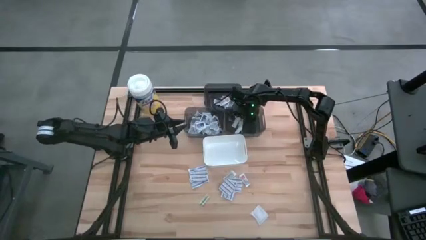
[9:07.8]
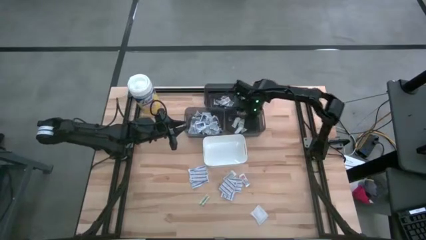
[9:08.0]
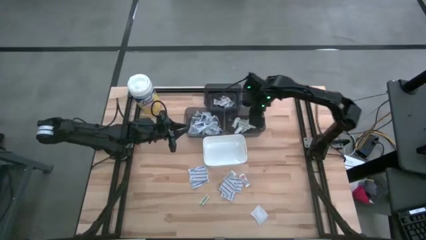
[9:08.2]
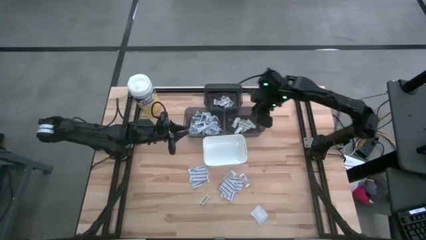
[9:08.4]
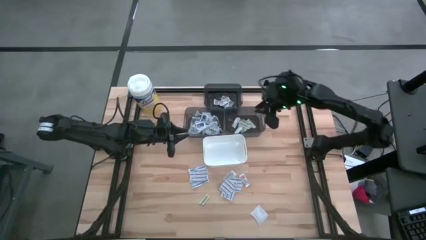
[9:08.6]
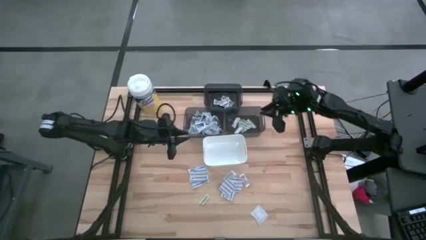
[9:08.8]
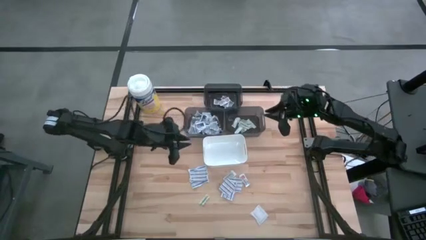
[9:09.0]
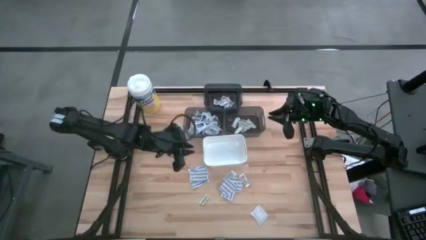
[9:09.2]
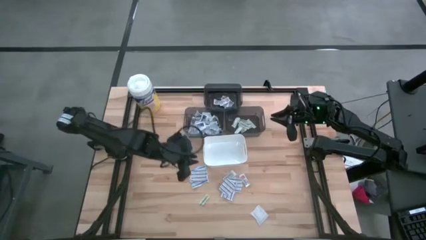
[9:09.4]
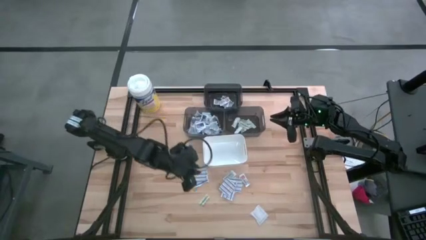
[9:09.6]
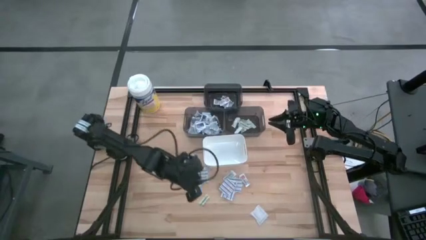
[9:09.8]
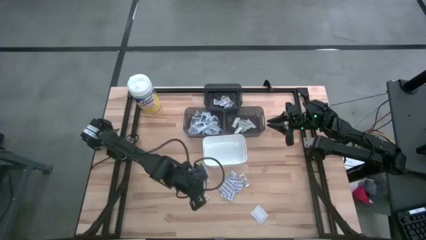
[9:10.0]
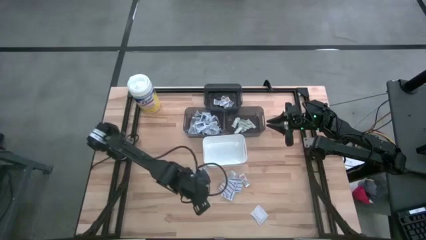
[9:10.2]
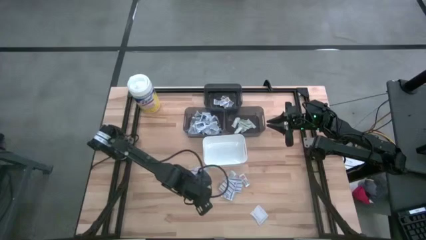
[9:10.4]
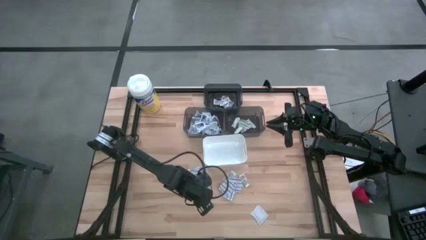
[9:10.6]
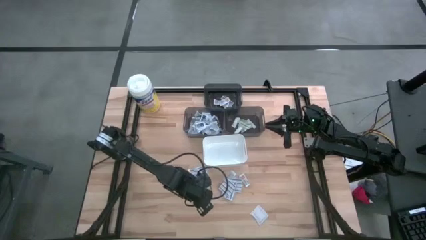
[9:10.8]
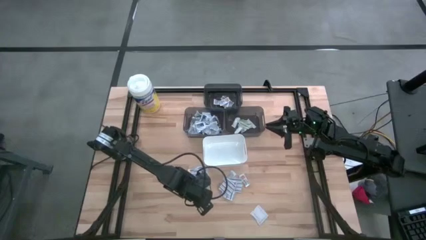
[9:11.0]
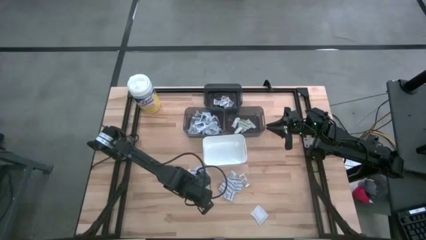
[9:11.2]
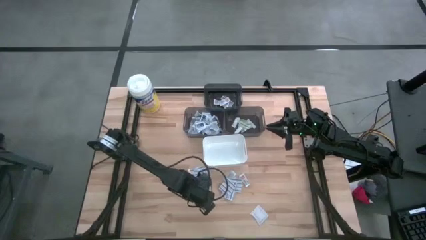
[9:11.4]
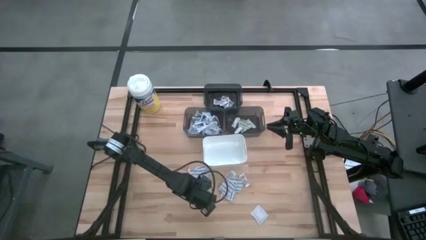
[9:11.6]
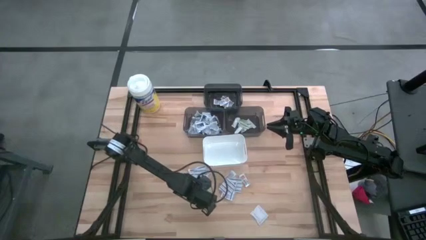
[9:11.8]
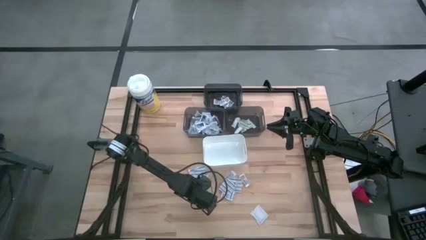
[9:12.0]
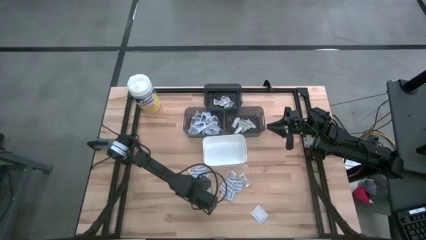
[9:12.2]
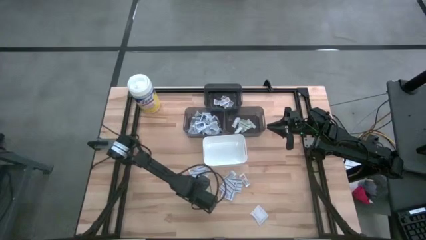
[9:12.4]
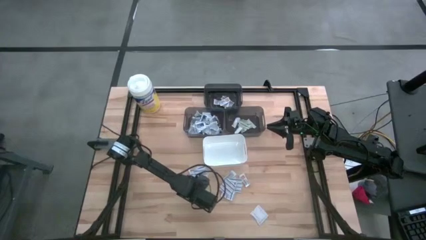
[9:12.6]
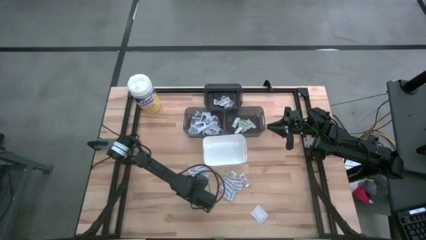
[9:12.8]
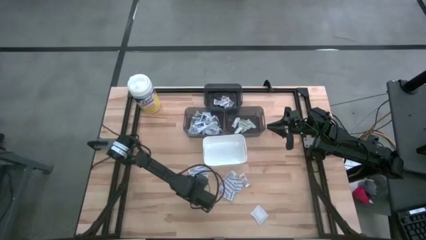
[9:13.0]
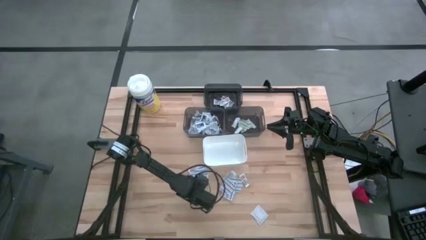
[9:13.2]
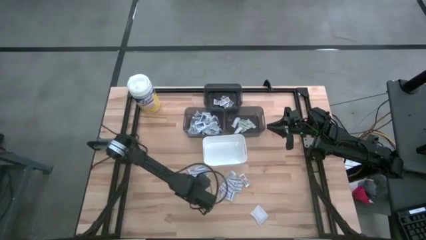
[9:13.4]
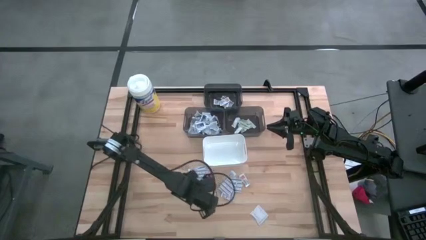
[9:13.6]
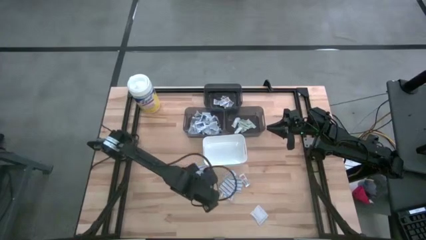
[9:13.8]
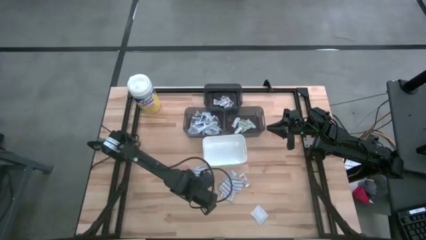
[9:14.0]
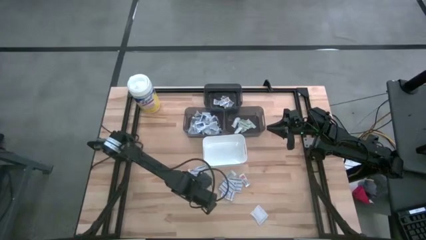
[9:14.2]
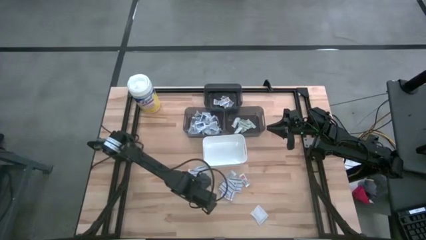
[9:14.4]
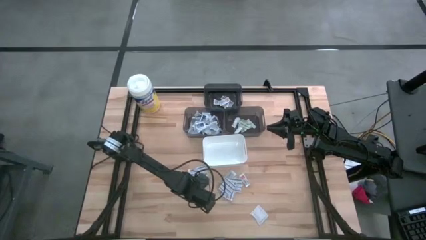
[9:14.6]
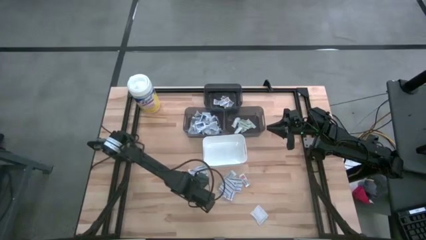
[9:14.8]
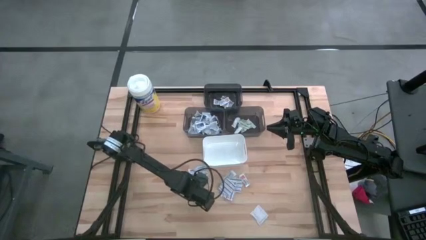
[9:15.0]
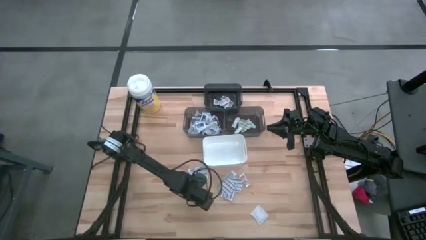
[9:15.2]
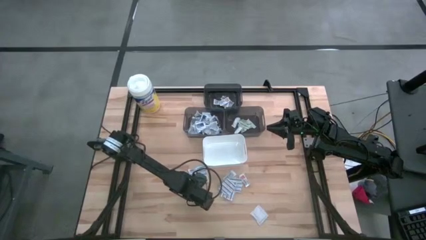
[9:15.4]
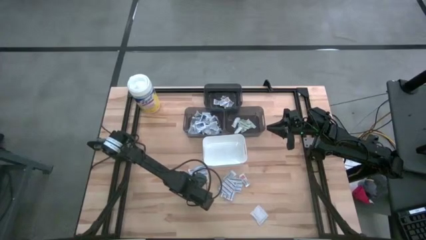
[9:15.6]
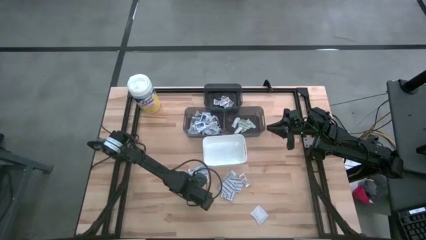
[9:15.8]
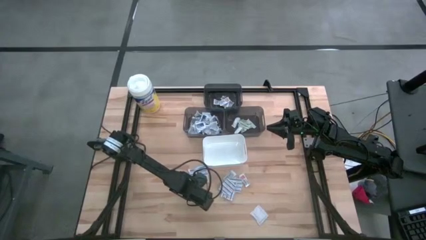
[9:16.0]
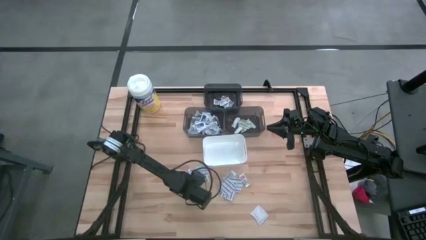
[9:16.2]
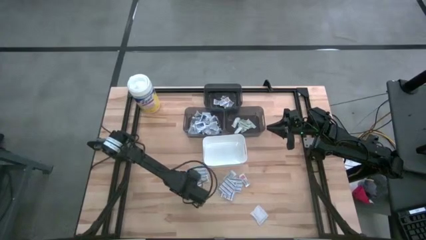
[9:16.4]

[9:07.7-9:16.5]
Task: Pick & Place First Aid Supplies
Put the green bandage into the bottom right black bin

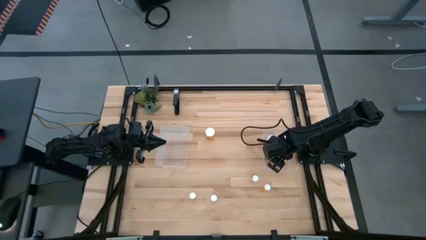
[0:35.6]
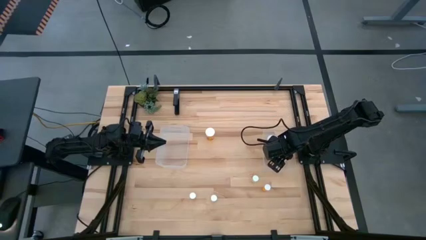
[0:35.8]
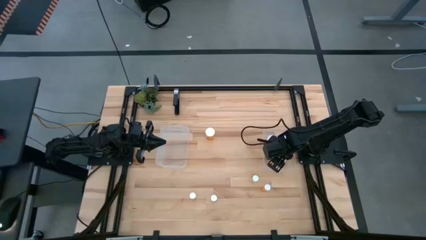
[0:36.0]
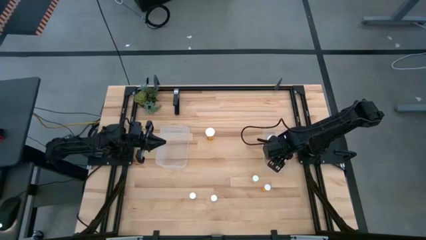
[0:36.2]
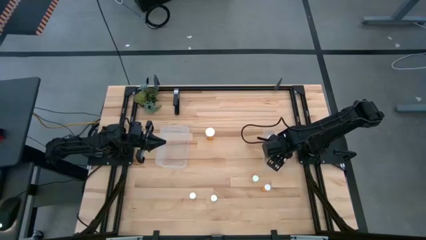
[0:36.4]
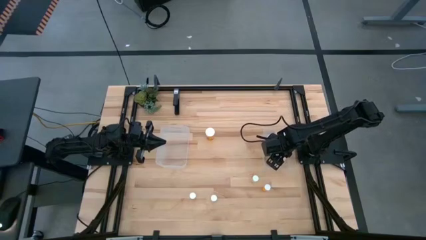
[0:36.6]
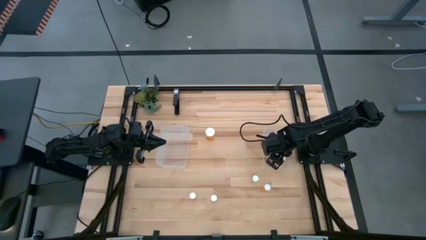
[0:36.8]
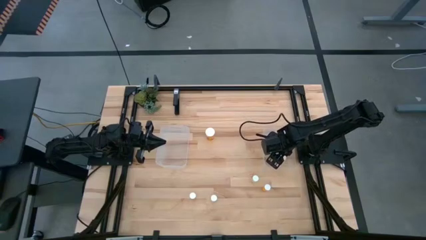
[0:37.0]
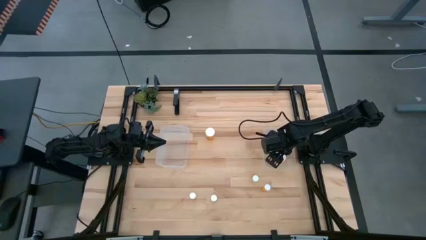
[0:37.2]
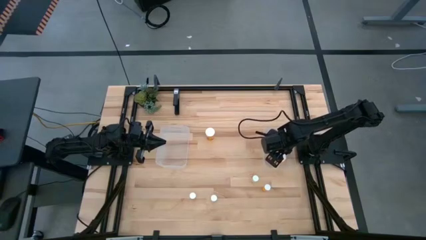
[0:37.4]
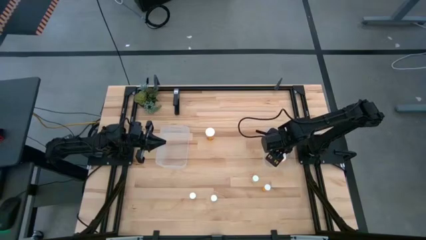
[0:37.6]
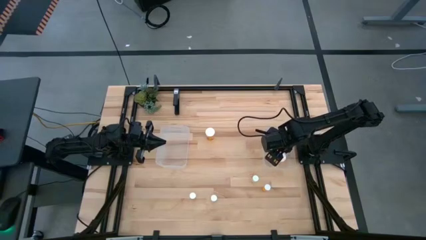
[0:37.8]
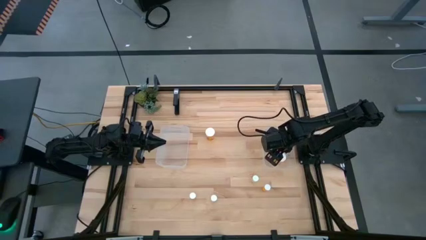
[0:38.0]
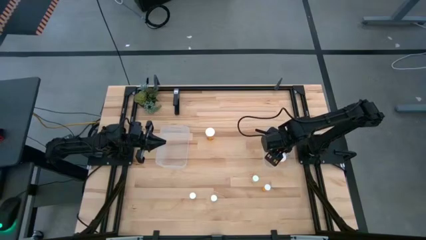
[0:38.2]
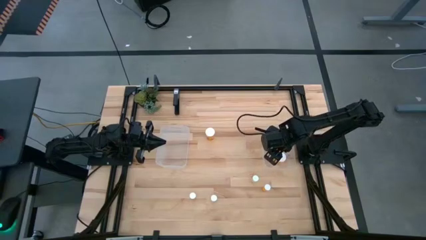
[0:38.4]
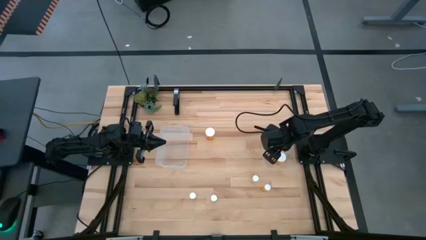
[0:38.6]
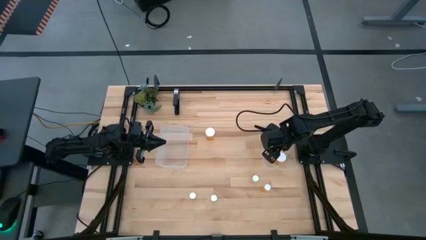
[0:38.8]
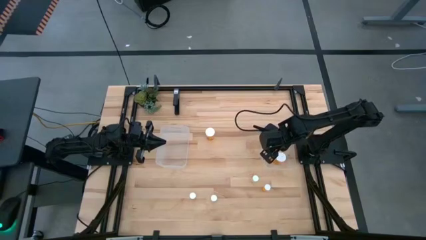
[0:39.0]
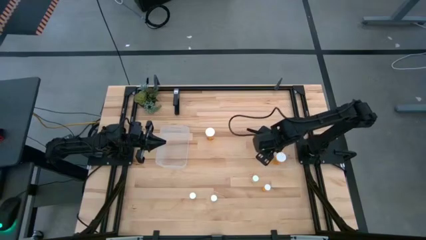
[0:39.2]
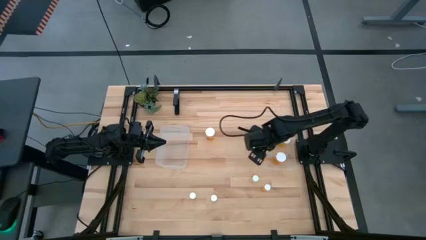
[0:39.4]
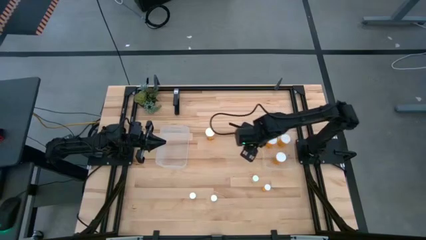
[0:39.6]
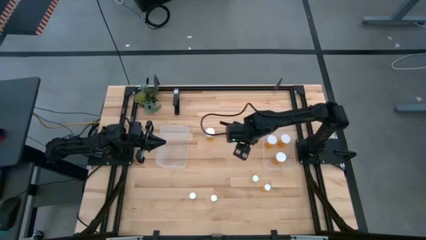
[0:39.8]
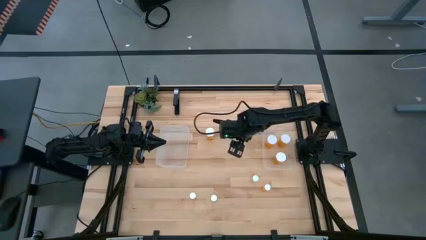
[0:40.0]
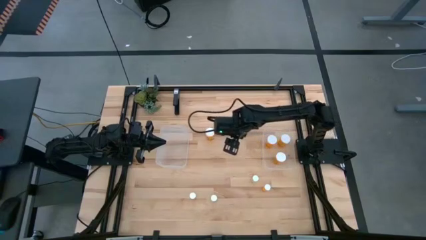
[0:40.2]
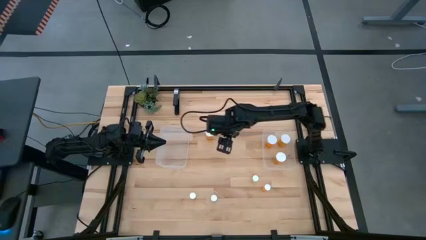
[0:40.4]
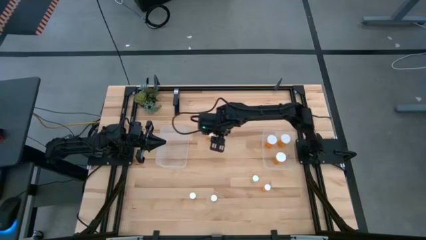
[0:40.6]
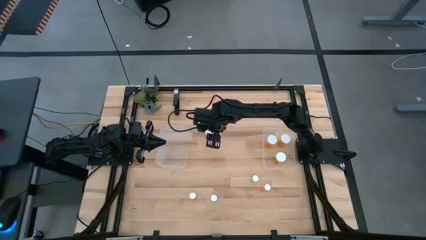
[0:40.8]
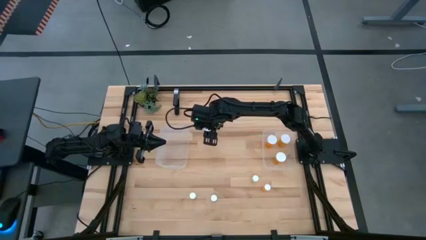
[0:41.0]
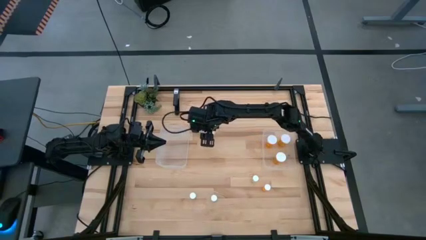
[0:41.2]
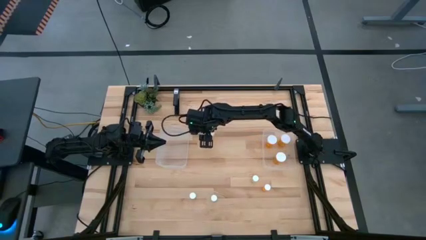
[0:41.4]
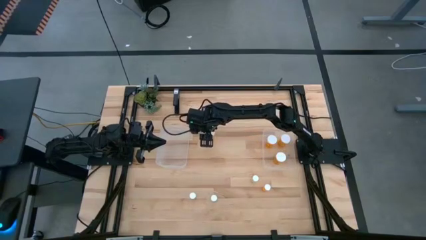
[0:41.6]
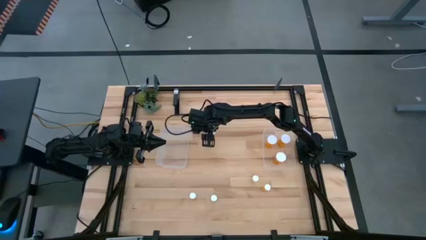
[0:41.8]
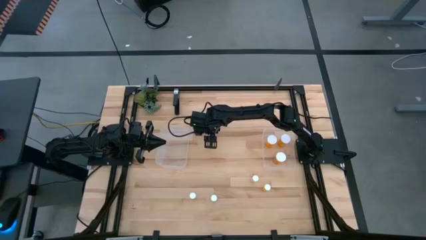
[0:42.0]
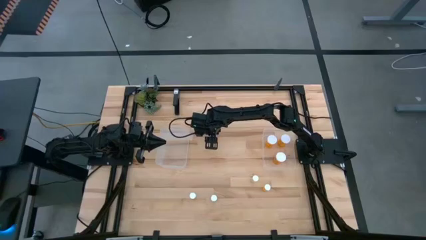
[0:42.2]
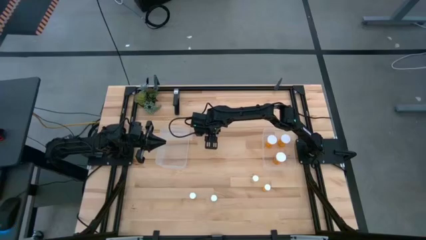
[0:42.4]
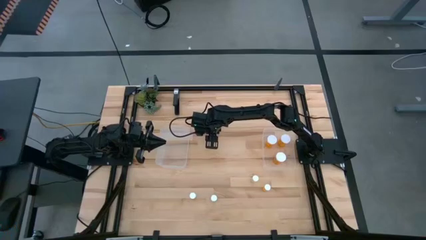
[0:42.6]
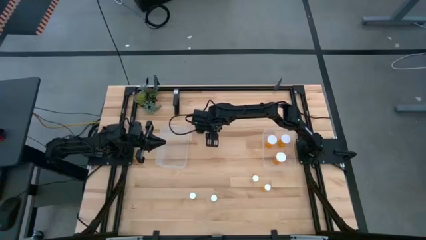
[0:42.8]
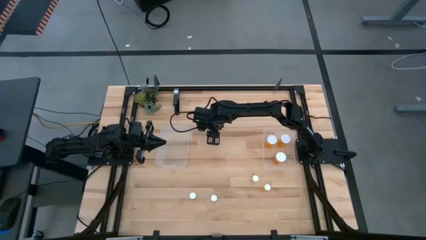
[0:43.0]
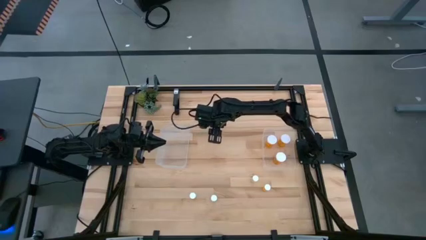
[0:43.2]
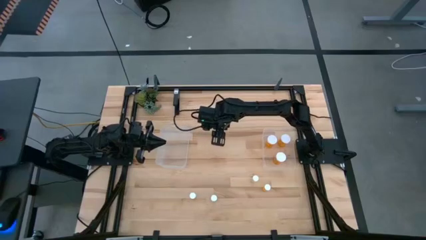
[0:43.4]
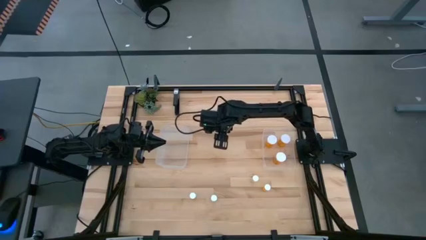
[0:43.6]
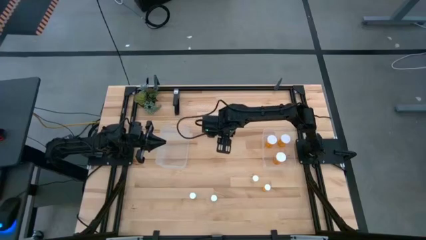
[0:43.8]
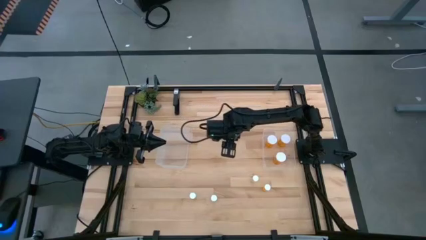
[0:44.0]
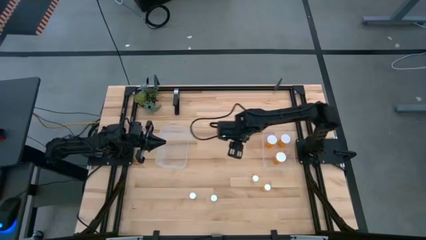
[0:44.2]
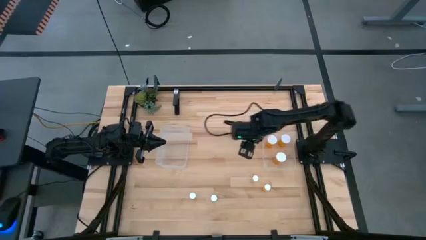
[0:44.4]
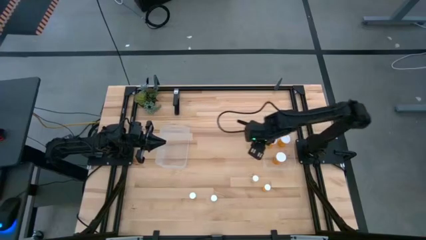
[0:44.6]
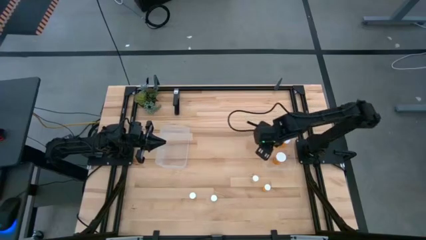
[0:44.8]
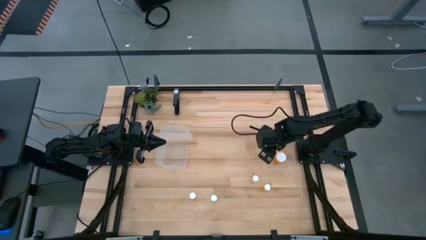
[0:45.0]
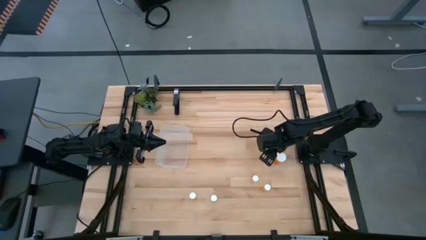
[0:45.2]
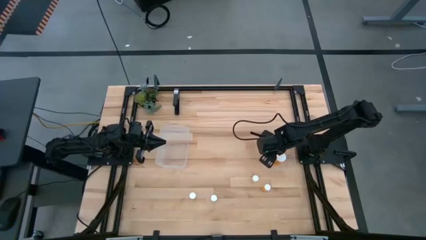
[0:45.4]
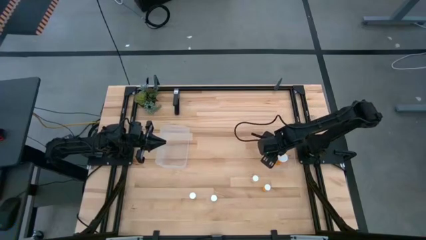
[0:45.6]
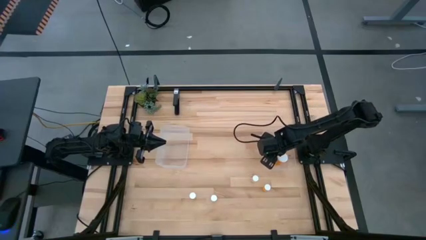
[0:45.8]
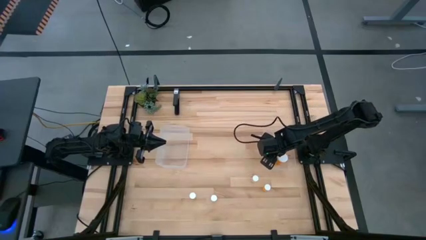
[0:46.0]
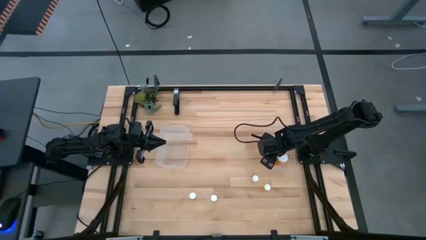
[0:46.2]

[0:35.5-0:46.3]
Task: Pick and place medicine bottles into bin by pill shape (circle, oval)
Put the large orange pill bottle into the right transparent bin
